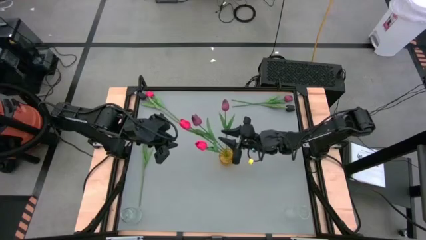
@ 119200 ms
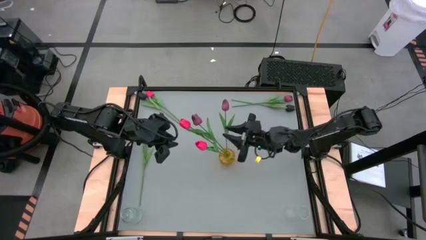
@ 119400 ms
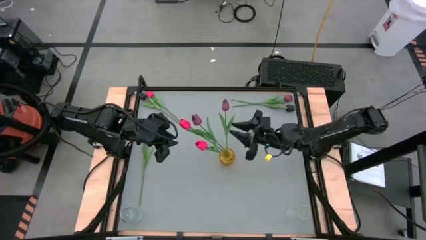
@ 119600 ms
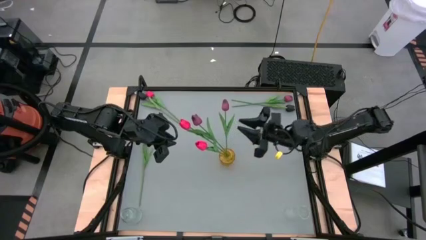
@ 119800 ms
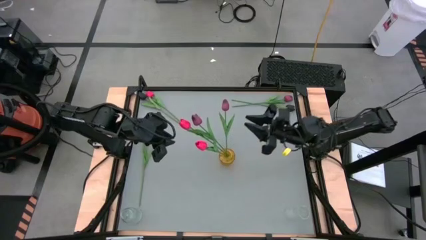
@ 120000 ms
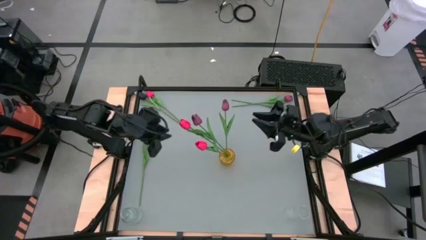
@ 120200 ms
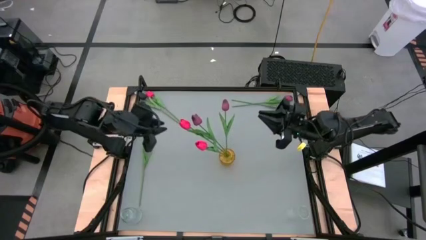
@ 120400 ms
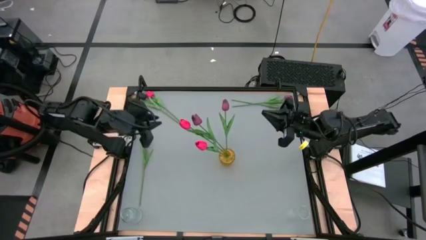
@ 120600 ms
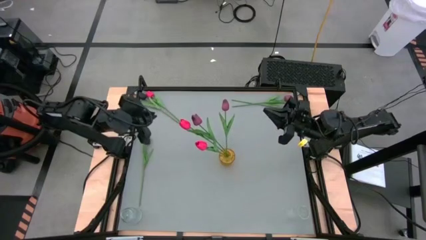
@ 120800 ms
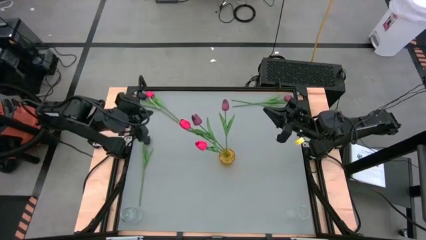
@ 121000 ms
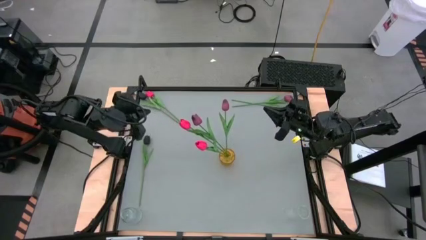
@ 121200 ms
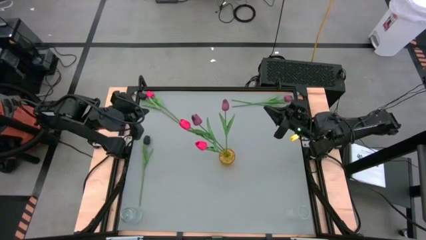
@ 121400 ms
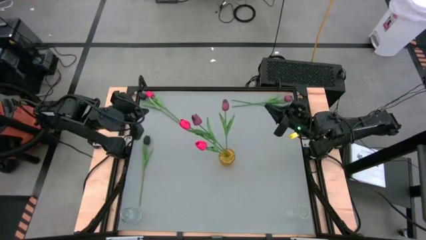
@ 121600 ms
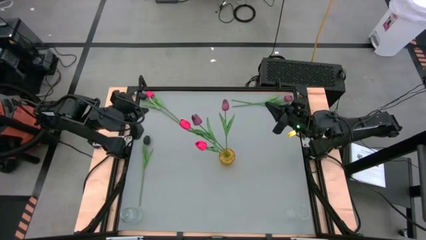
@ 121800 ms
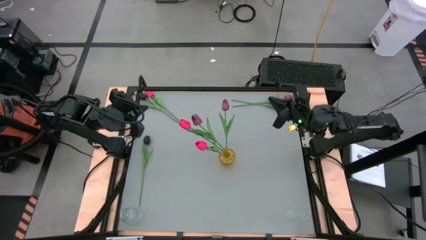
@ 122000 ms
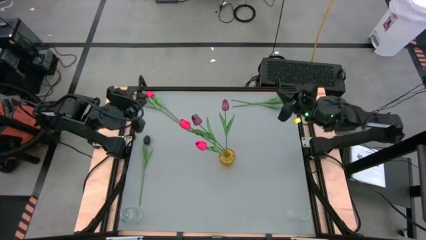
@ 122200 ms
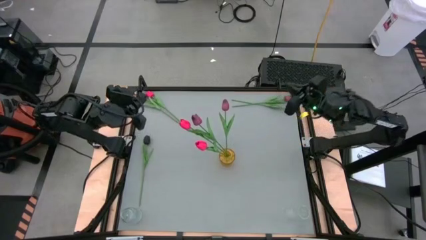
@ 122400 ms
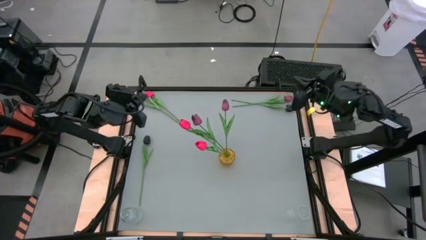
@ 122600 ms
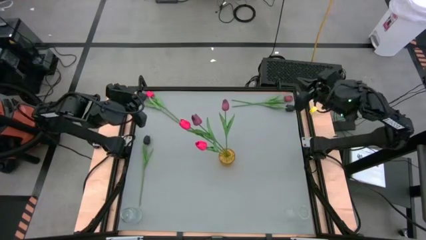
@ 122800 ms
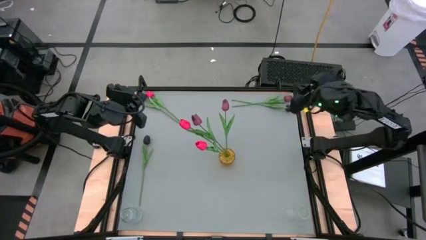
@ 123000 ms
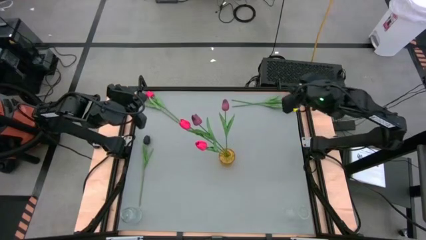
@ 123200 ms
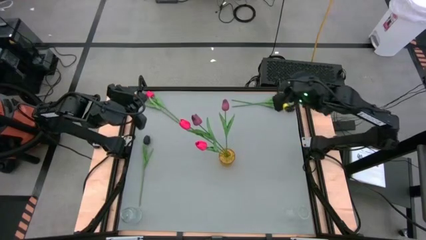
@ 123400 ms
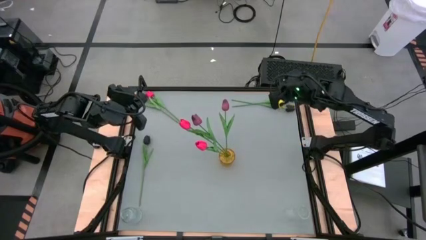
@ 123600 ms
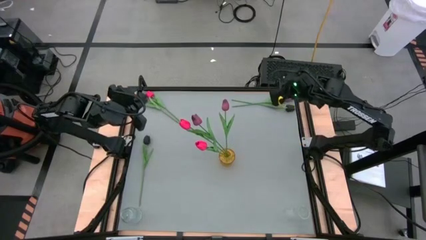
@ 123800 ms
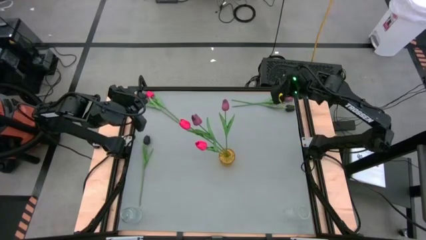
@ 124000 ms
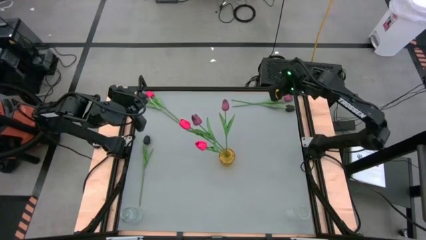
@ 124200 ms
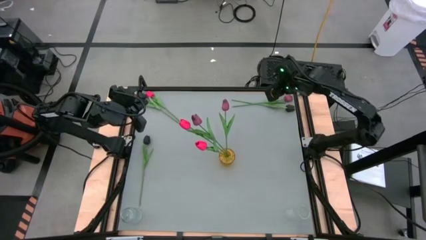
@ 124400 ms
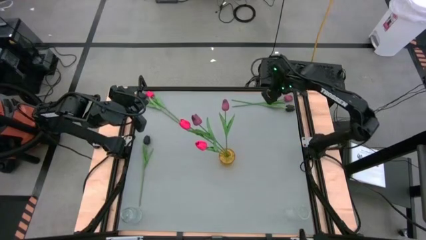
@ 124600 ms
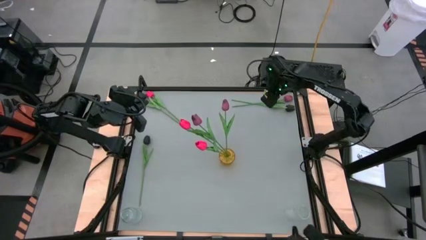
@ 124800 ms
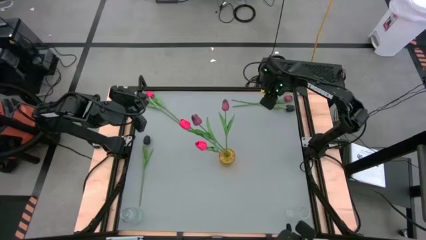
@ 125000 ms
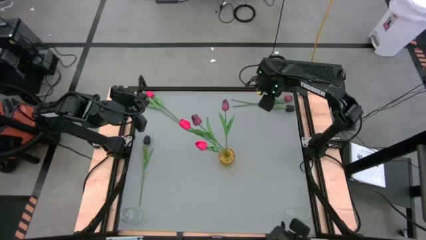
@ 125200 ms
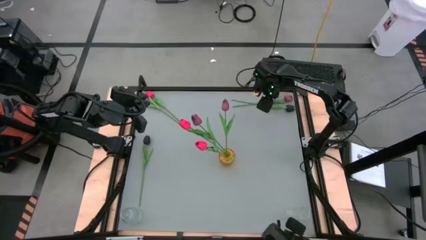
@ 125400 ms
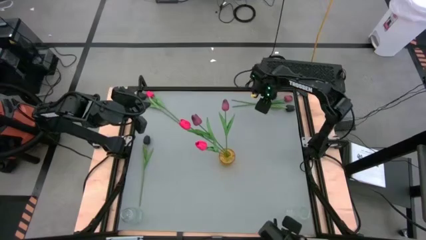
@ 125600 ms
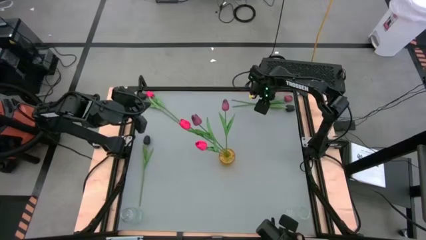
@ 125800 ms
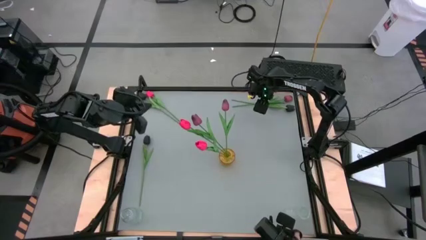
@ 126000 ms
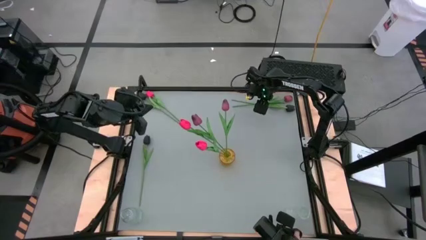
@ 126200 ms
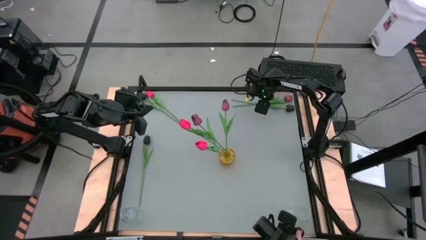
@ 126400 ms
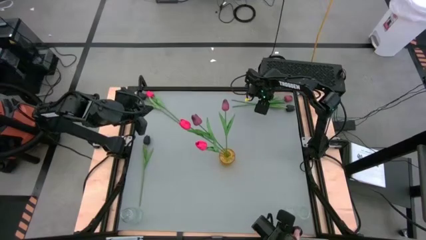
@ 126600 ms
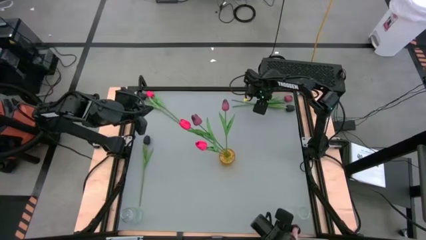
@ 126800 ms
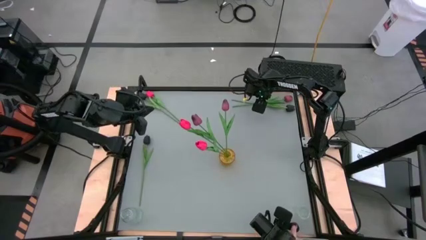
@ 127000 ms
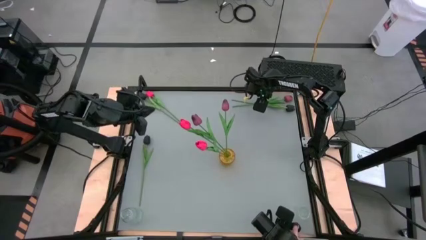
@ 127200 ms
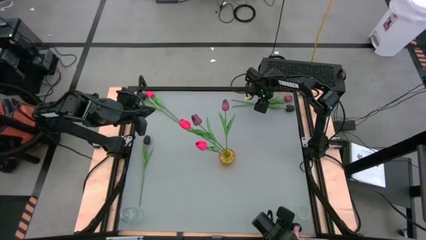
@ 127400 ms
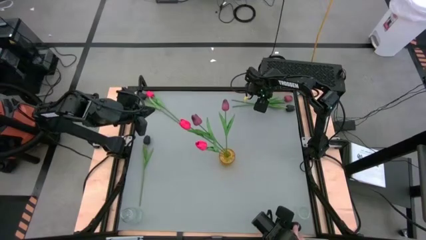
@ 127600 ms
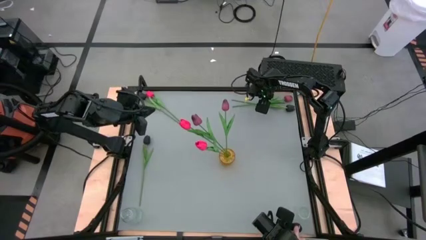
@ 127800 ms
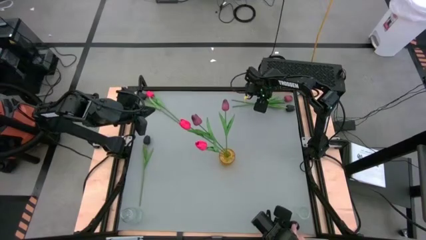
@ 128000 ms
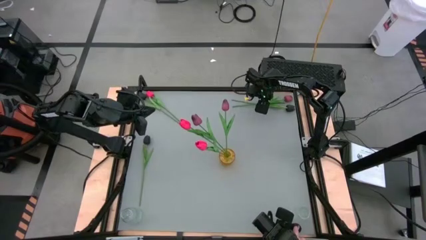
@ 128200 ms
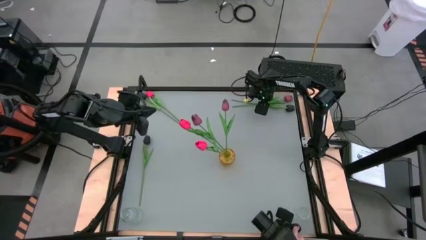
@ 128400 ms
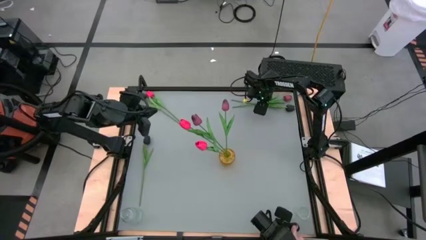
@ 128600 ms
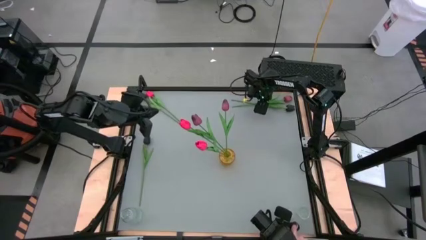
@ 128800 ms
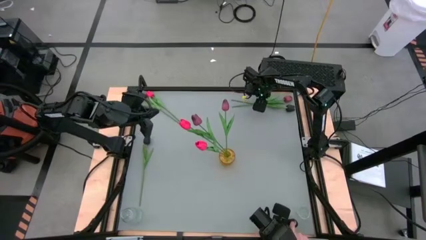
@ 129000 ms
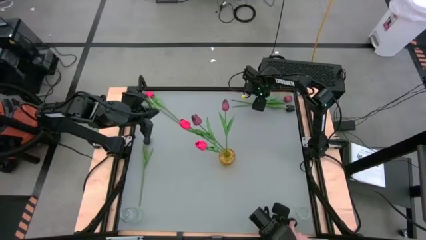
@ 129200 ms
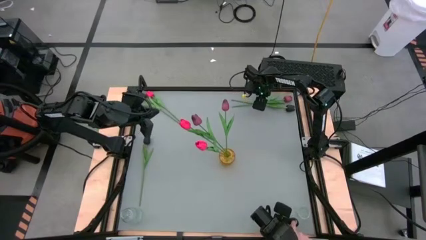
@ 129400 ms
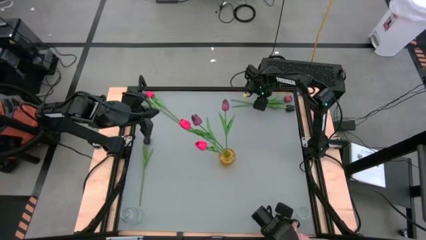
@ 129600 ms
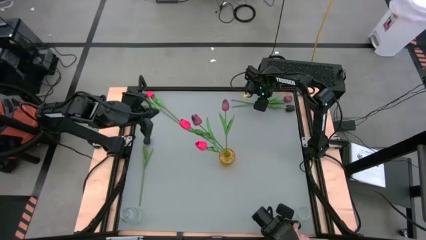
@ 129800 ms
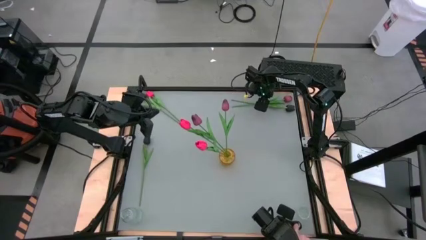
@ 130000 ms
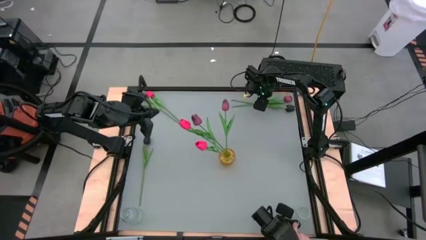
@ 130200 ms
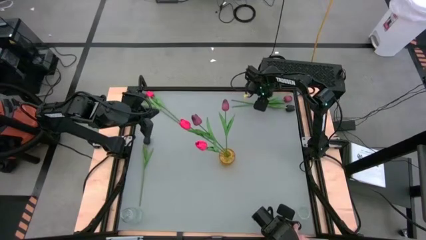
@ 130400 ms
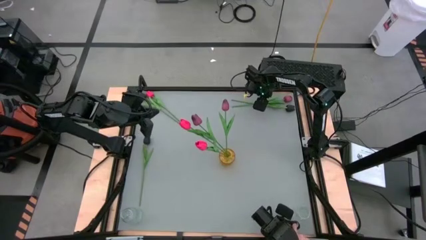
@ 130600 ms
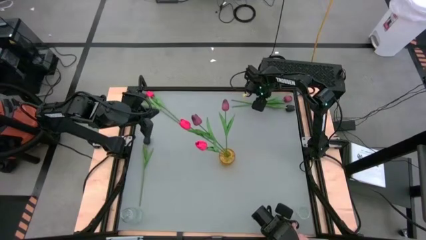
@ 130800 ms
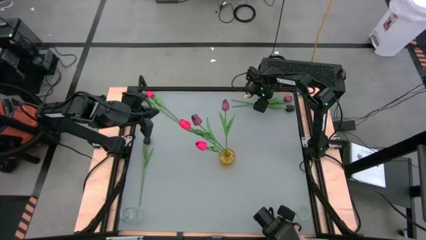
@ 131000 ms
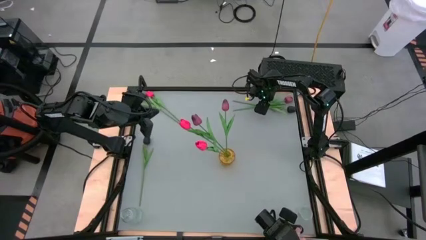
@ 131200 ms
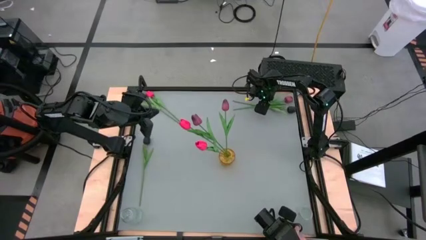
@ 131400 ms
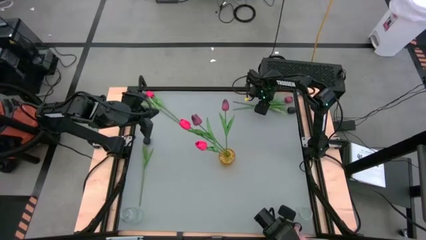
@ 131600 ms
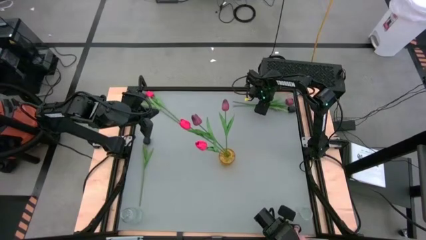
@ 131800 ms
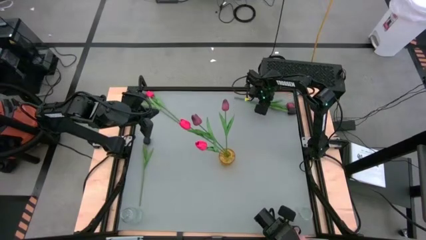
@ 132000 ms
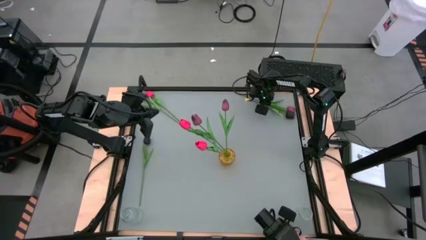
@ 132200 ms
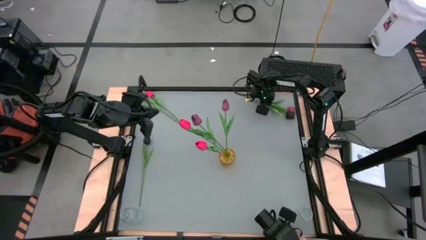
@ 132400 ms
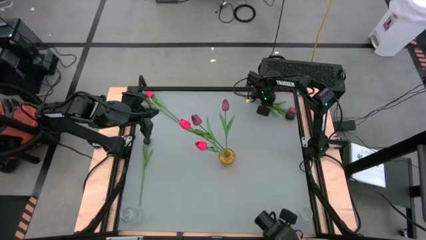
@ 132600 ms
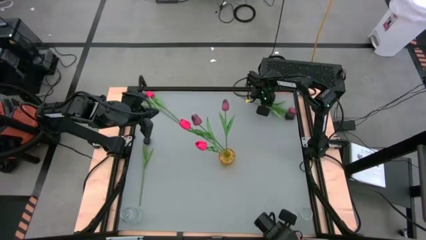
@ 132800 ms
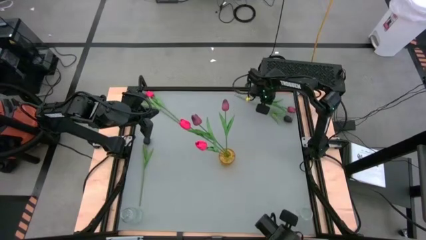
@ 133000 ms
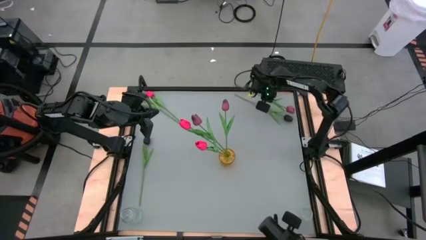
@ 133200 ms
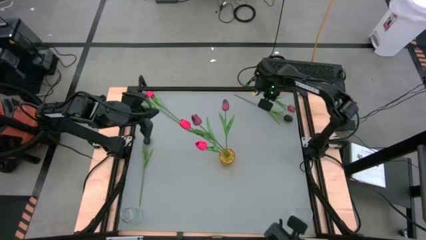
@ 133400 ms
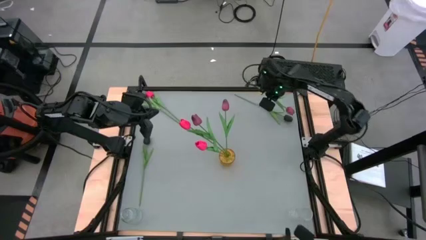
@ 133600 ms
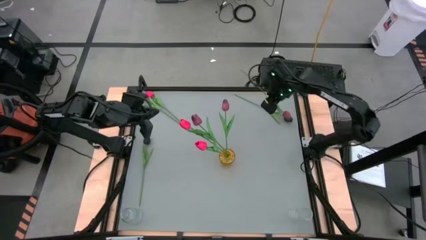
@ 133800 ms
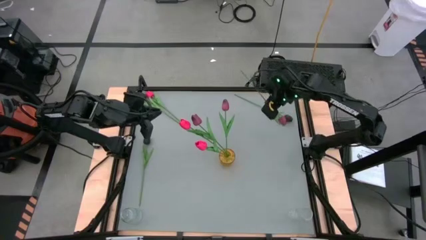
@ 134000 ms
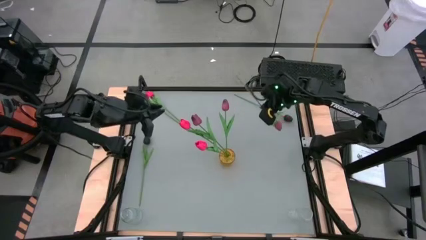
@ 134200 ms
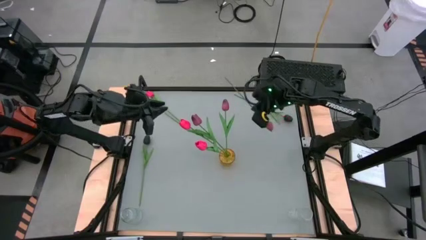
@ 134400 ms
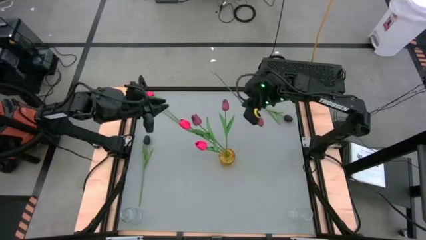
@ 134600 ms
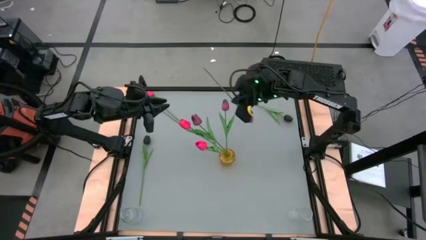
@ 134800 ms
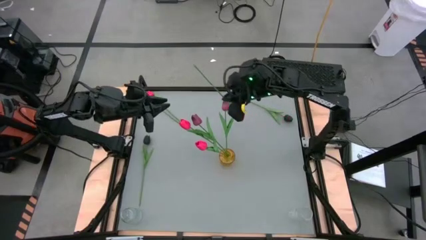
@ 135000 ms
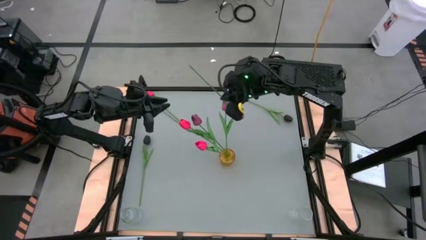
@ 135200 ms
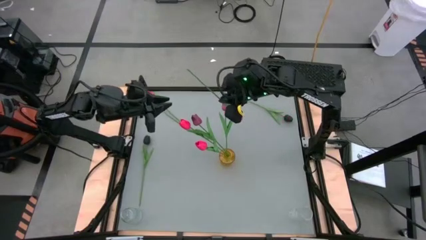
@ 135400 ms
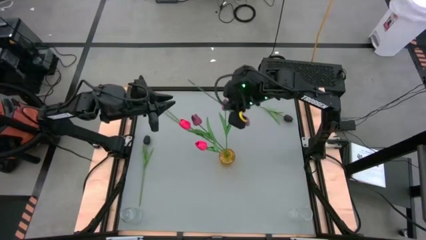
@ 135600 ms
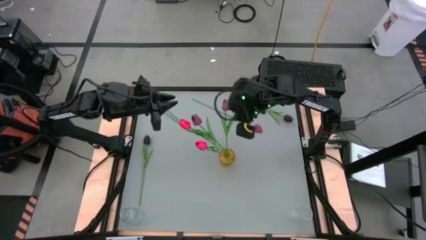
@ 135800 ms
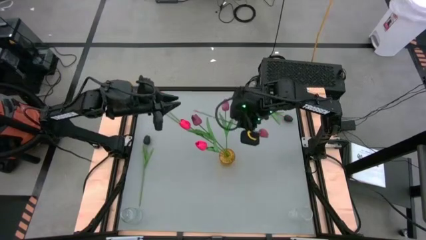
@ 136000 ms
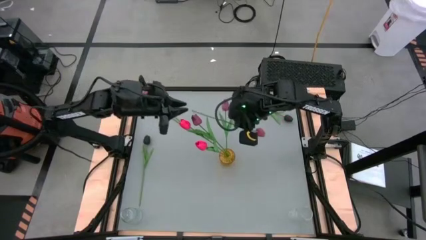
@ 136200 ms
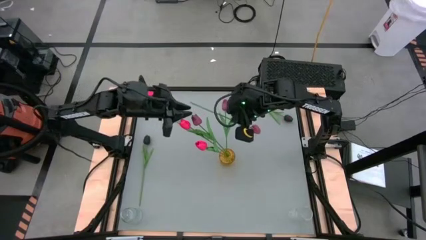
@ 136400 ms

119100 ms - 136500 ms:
Task: Sort flowers into vase by color
Put the red flower into the yellow vase
